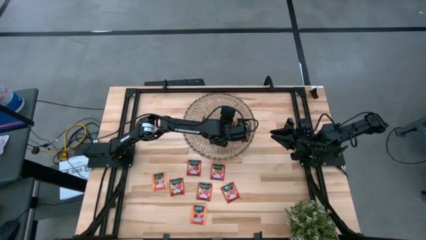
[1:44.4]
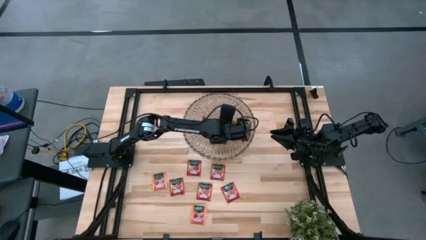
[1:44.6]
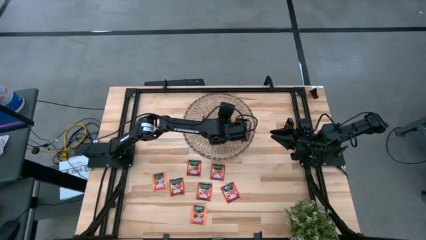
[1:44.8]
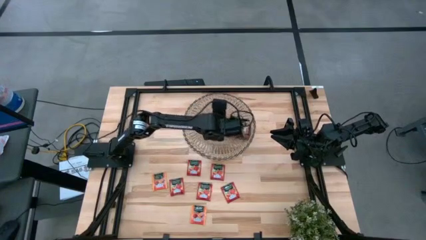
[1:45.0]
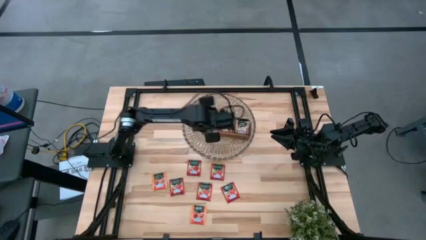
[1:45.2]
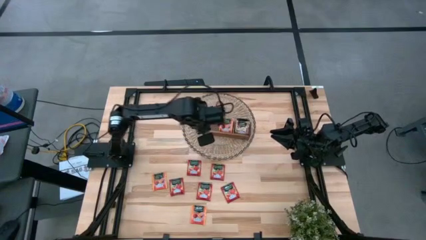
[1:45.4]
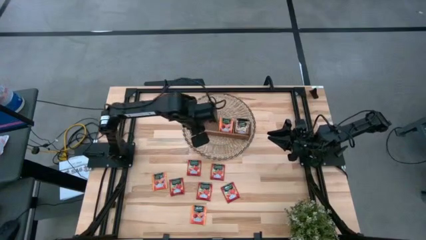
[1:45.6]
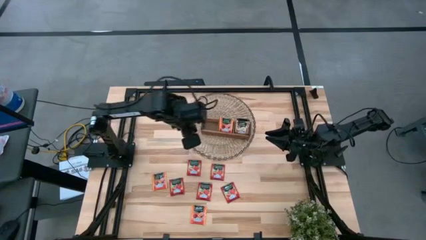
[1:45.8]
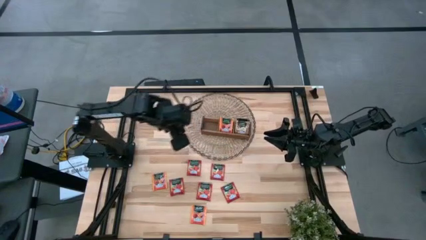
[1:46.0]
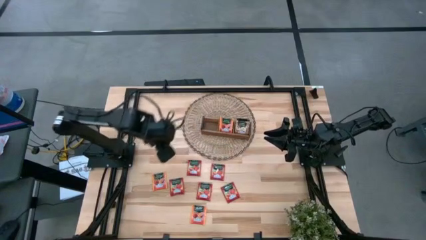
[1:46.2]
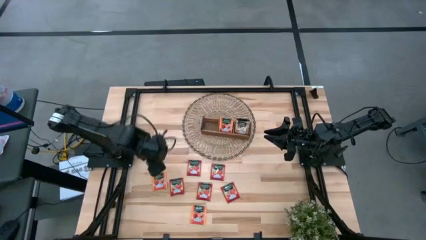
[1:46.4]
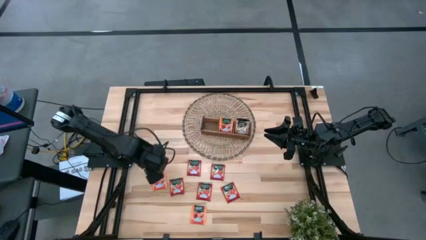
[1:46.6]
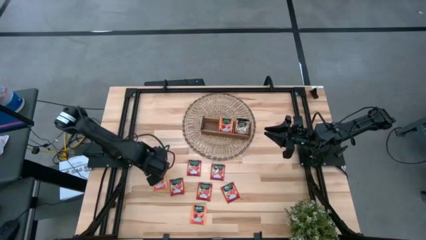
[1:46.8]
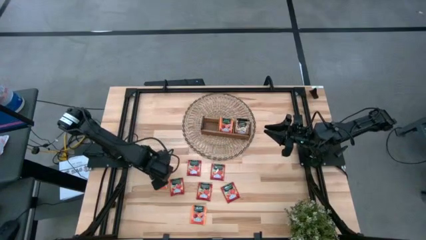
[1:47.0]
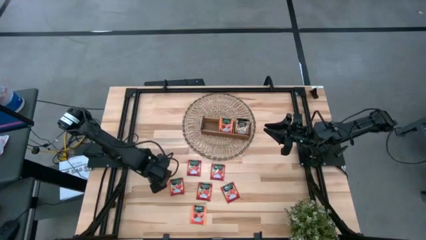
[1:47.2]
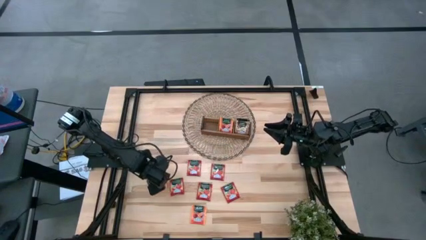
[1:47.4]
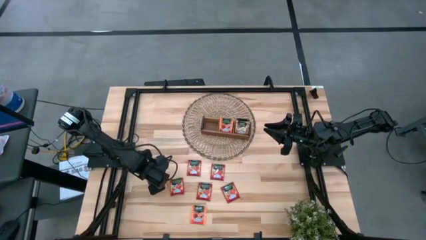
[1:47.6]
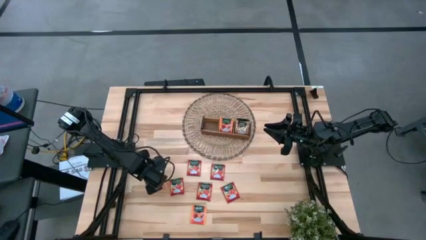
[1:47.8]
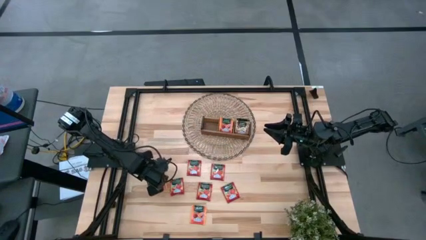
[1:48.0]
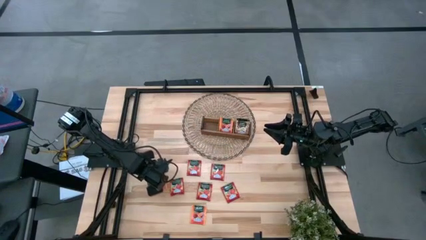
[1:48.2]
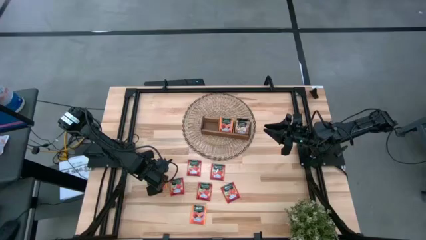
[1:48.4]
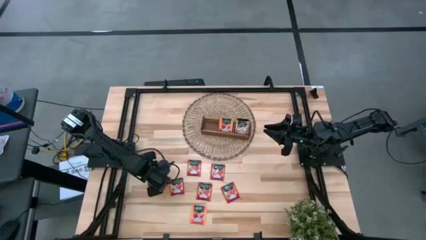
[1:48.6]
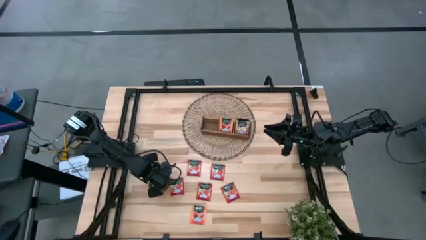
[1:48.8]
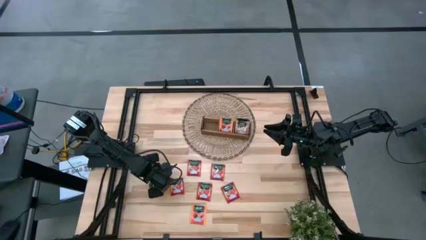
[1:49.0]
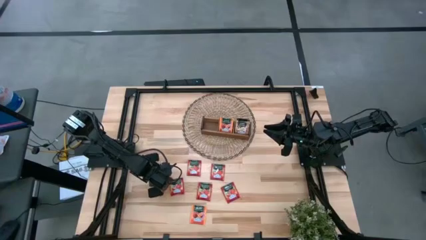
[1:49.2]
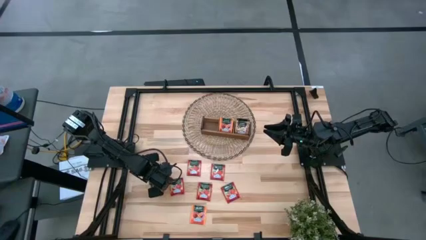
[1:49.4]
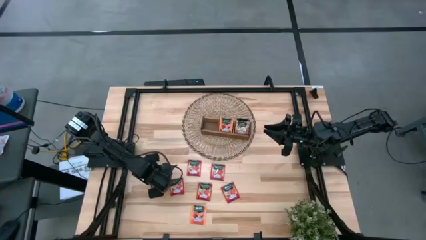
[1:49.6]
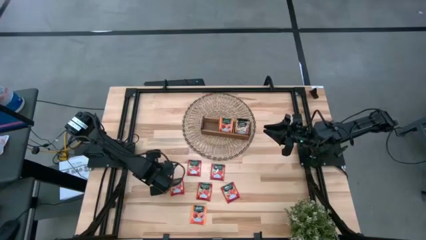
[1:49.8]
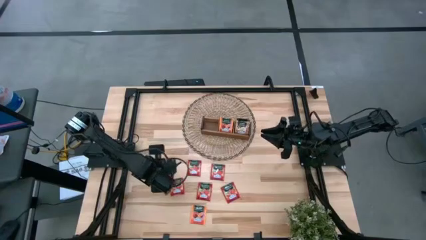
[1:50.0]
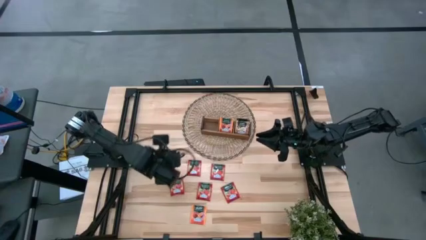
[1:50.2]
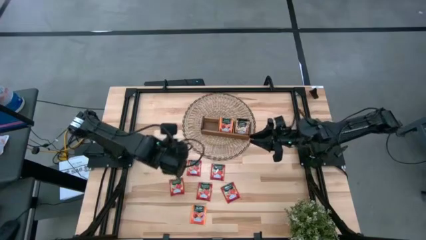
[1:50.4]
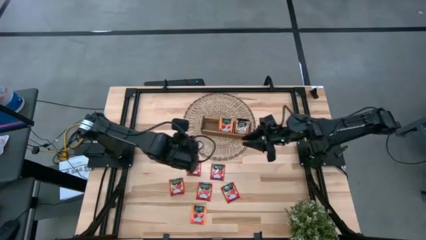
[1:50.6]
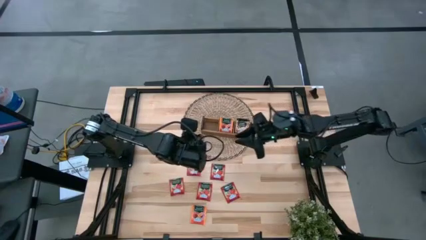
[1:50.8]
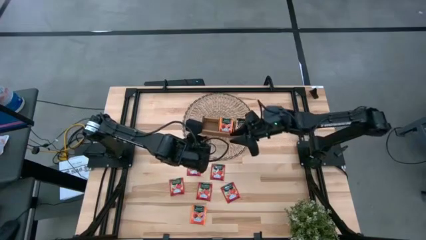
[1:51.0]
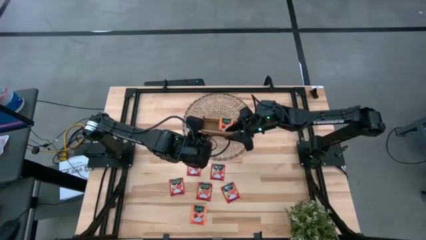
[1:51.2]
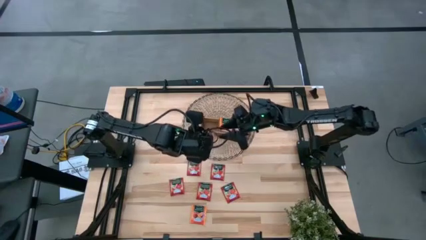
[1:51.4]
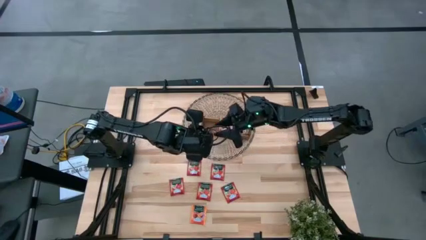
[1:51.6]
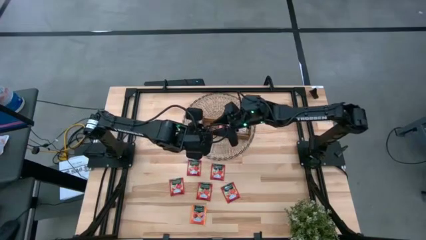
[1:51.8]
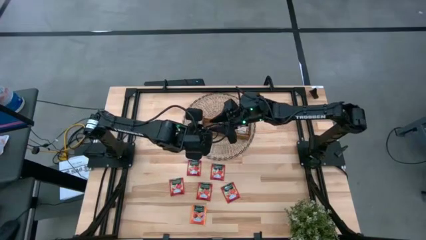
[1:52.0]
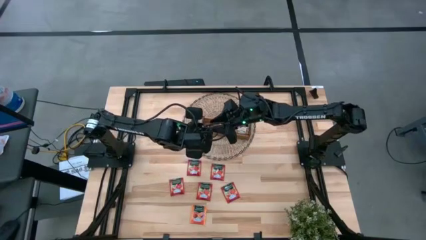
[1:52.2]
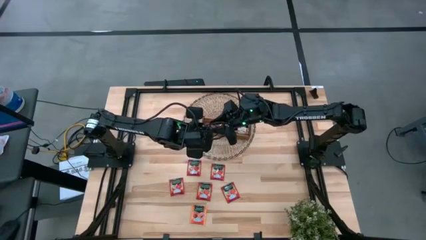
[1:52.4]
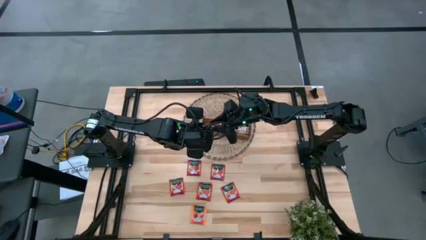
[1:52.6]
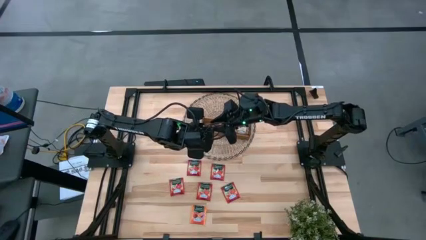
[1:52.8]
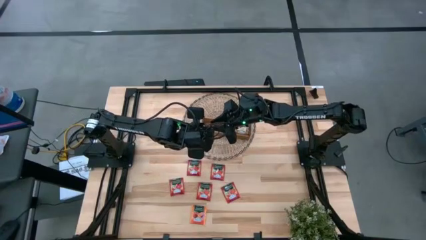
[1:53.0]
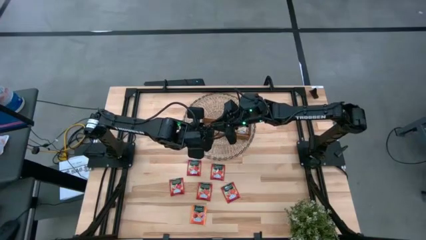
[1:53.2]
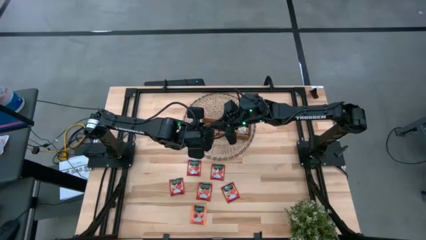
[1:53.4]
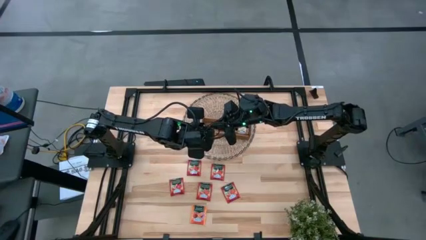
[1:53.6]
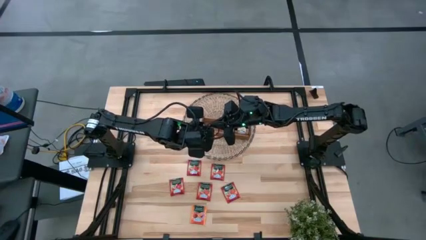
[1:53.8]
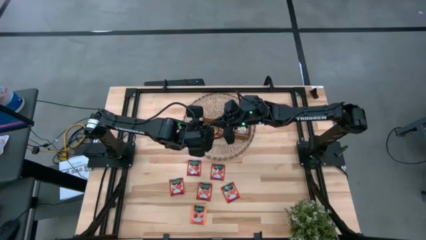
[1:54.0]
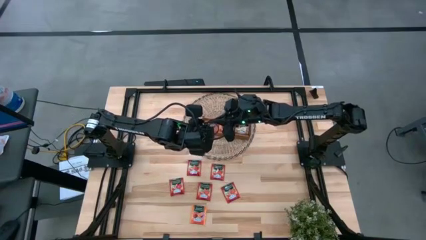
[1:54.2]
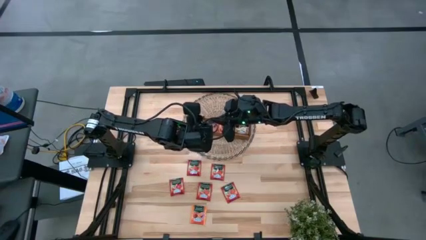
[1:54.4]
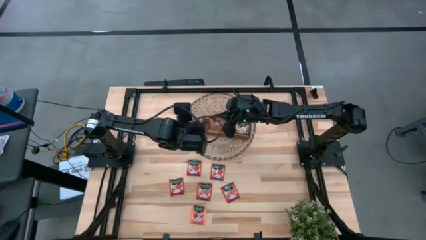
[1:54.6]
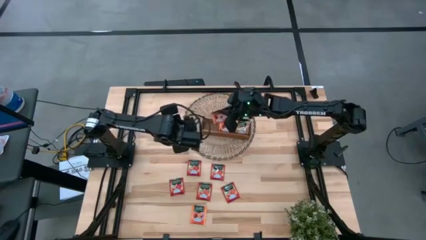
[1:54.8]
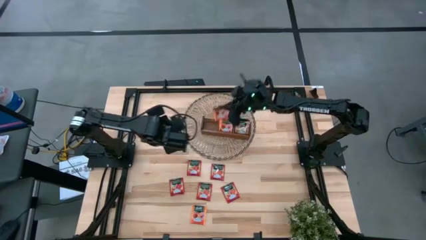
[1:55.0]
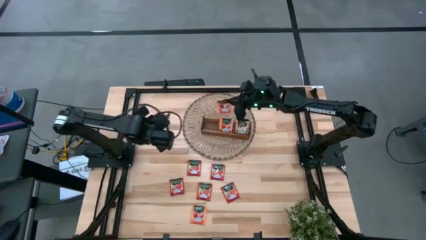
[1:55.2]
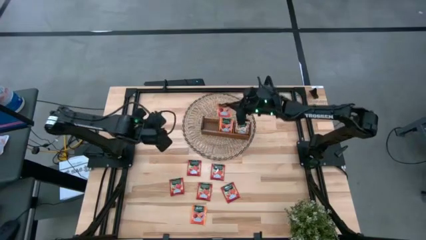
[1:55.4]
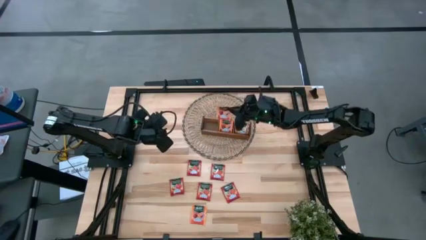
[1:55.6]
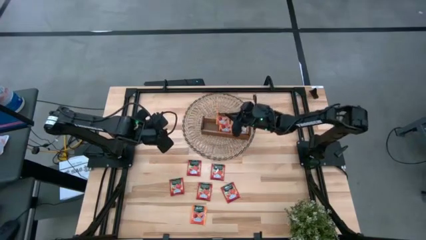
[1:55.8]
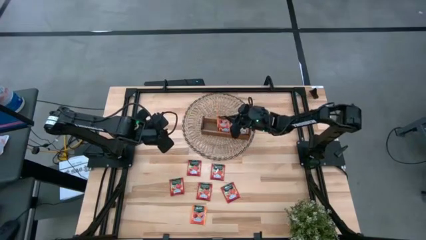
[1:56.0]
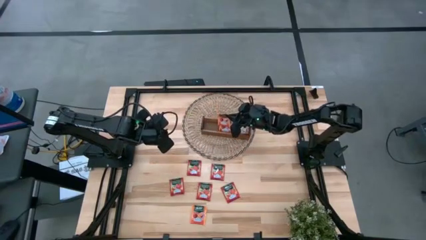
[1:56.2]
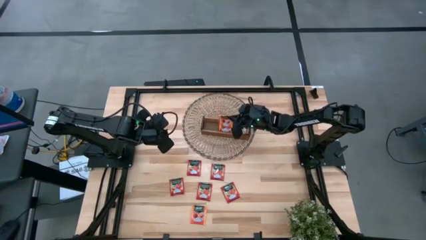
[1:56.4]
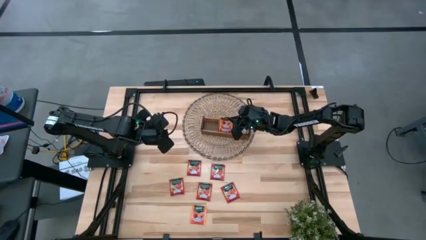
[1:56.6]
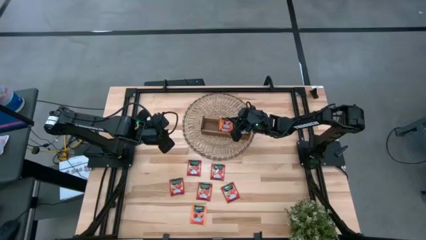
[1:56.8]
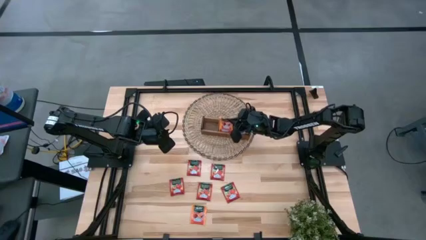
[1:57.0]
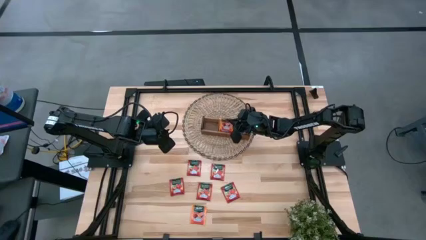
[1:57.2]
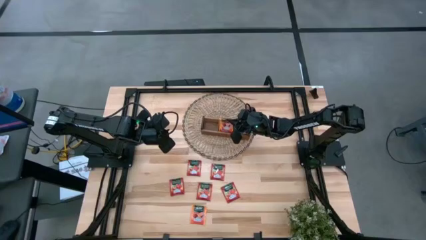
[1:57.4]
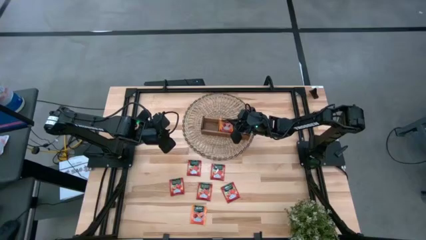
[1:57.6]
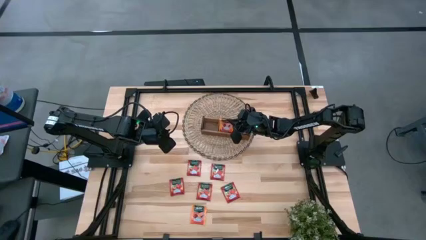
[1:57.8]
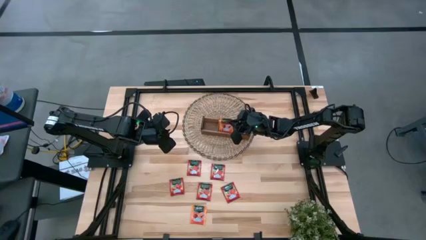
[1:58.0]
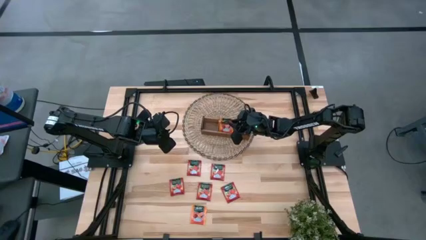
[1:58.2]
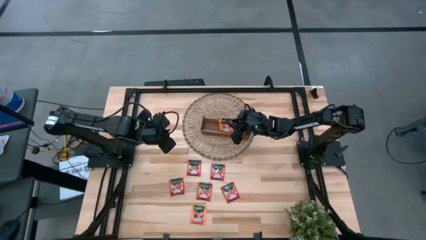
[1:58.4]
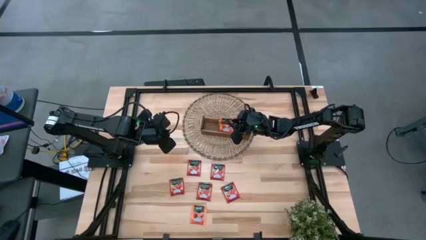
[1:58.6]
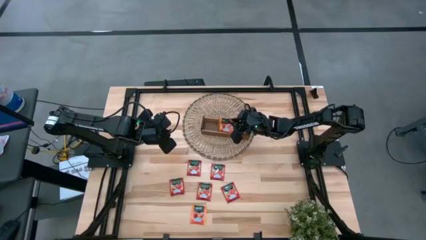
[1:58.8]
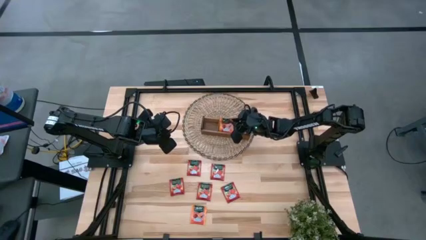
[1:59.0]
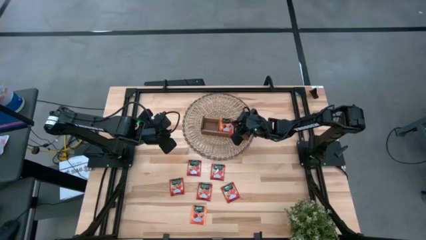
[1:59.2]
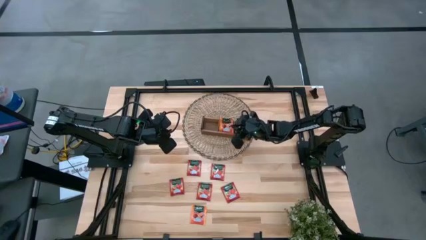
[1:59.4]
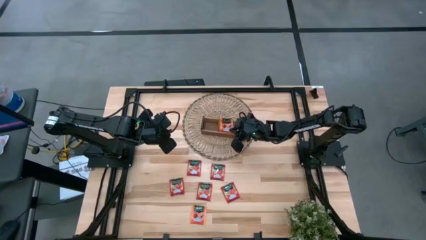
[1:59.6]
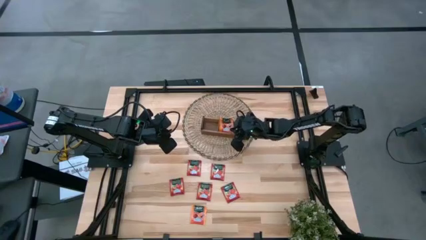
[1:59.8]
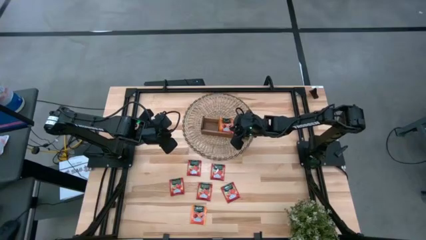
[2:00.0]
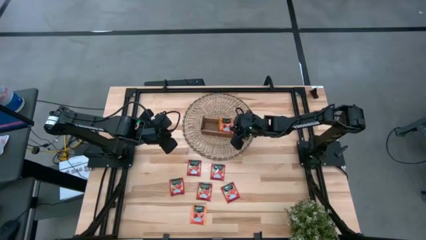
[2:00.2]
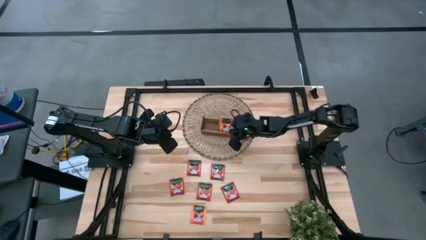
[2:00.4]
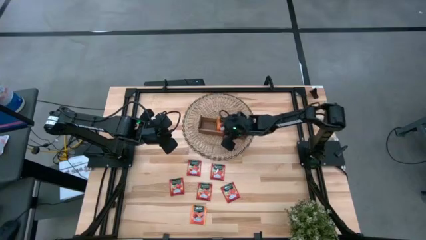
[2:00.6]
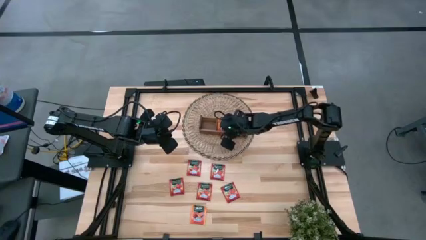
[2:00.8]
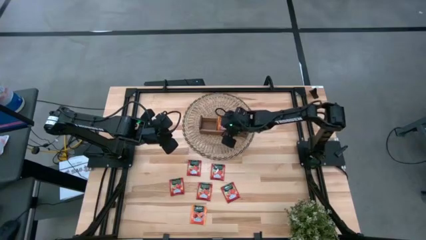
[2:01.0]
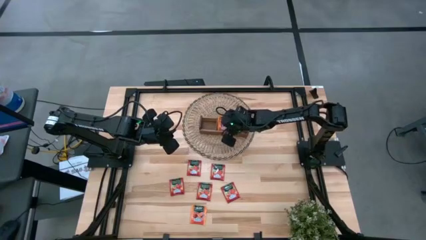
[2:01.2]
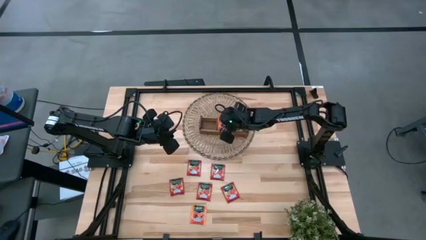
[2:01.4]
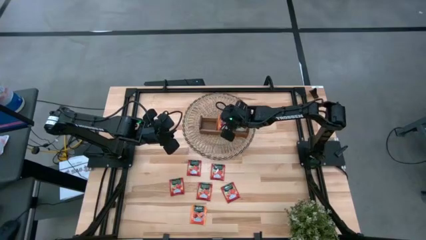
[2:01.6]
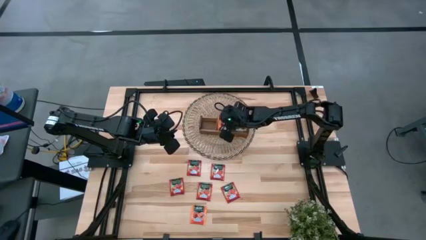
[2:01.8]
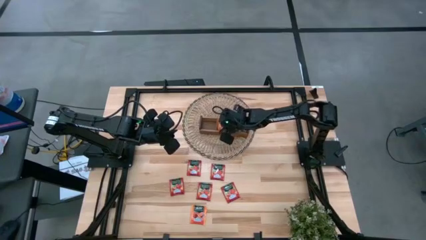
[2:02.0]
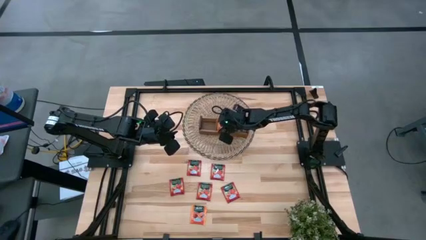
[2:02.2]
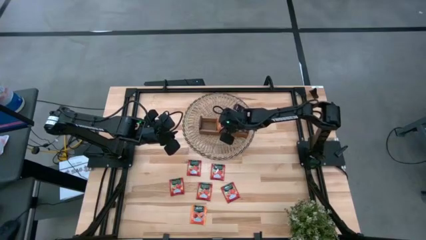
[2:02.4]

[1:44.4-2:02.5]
Task: Pick & Place Tea
Put the left orange tea bag into the middle slot of the wooden organizer
